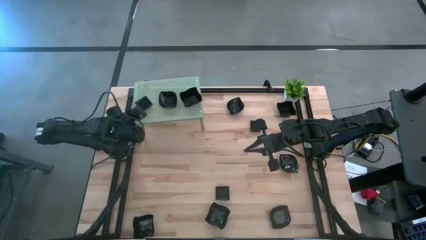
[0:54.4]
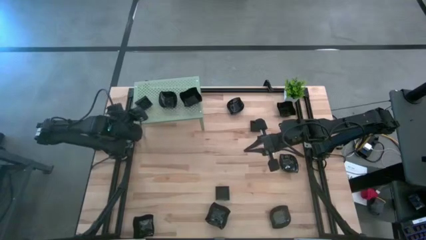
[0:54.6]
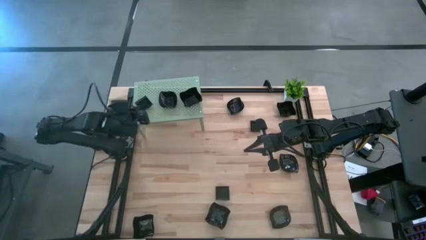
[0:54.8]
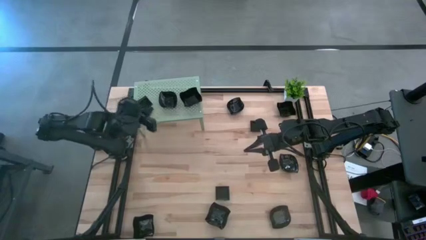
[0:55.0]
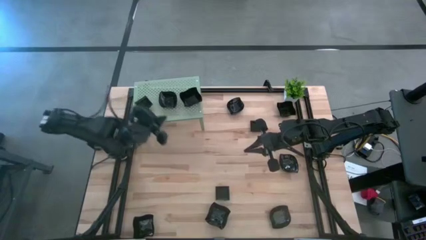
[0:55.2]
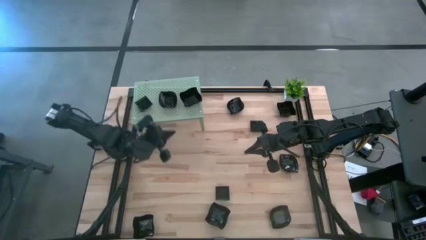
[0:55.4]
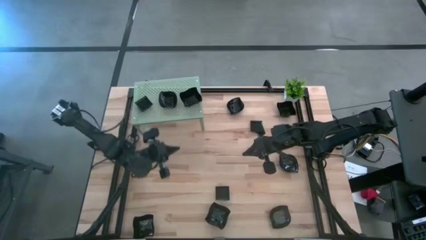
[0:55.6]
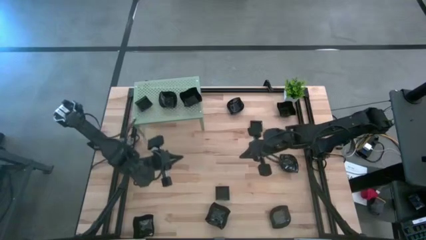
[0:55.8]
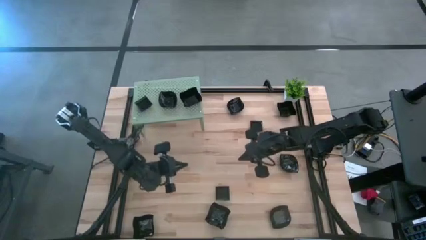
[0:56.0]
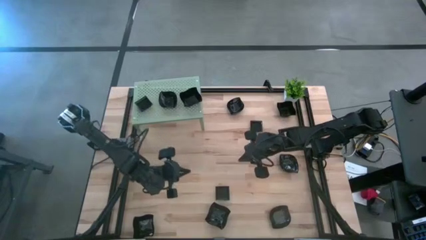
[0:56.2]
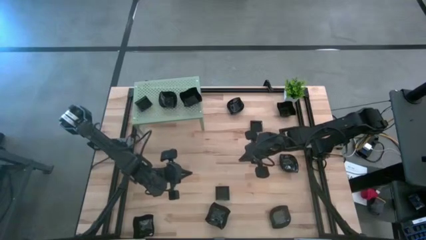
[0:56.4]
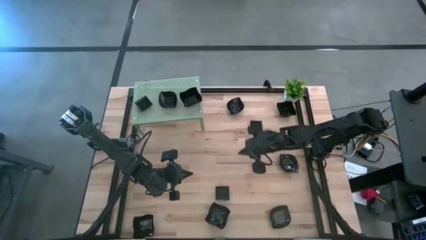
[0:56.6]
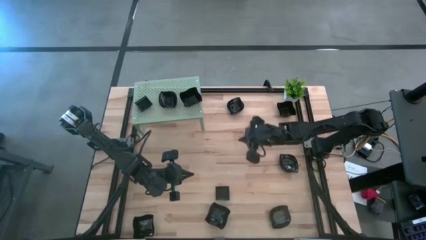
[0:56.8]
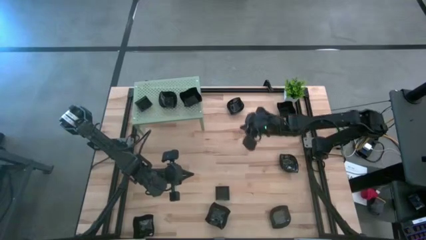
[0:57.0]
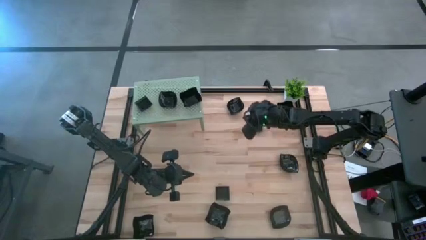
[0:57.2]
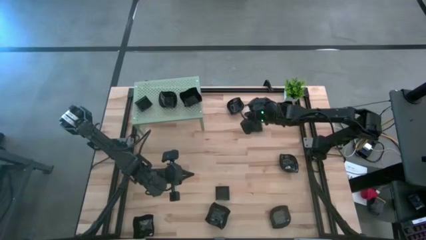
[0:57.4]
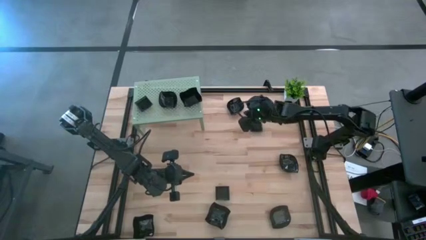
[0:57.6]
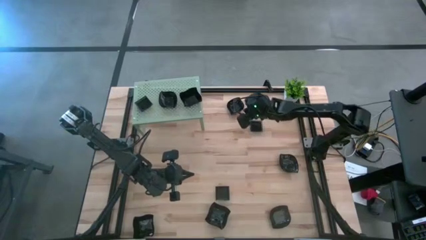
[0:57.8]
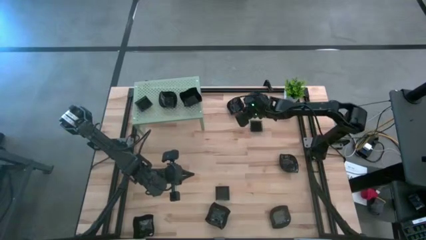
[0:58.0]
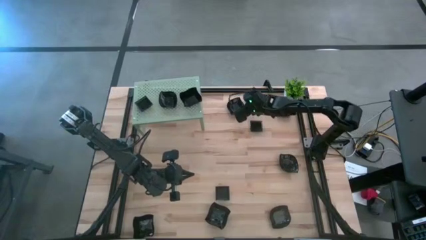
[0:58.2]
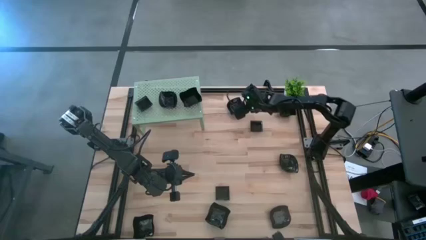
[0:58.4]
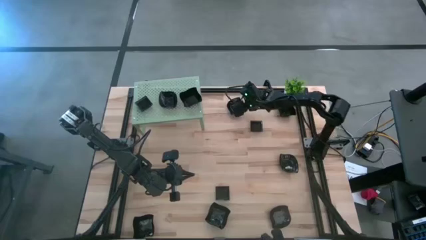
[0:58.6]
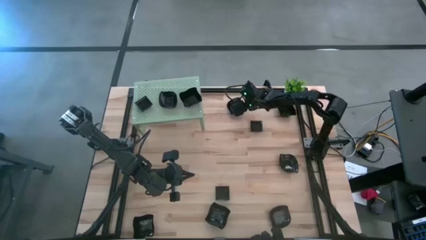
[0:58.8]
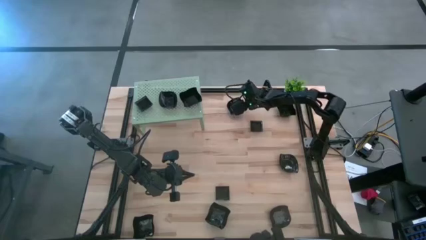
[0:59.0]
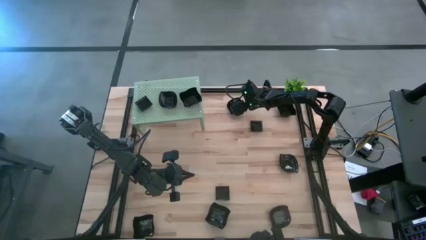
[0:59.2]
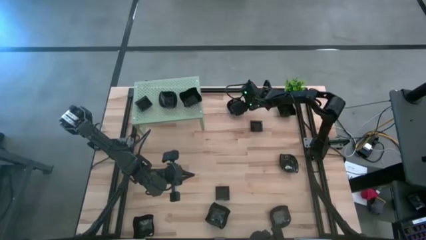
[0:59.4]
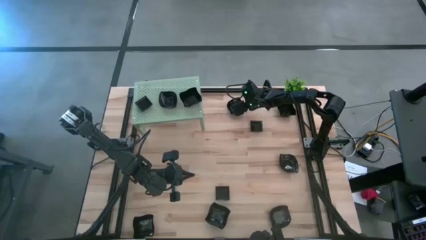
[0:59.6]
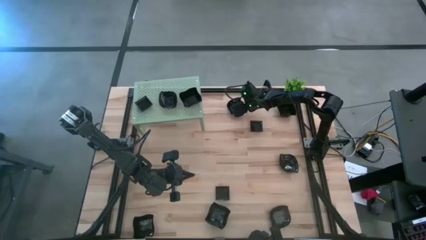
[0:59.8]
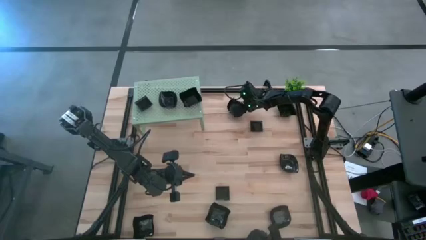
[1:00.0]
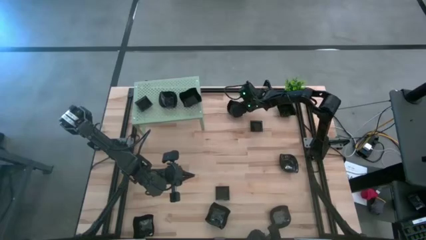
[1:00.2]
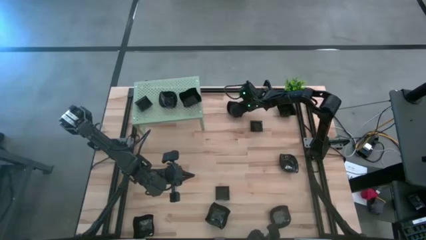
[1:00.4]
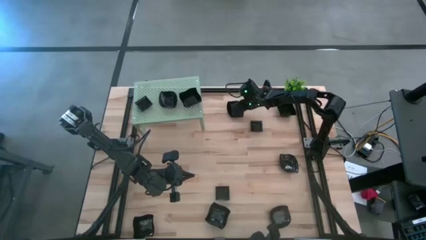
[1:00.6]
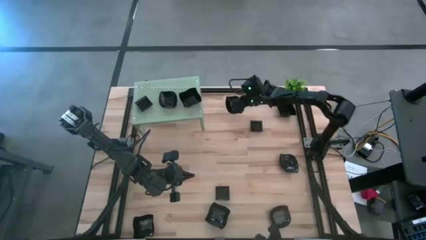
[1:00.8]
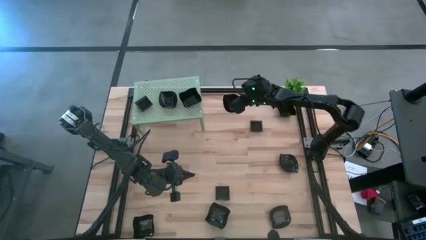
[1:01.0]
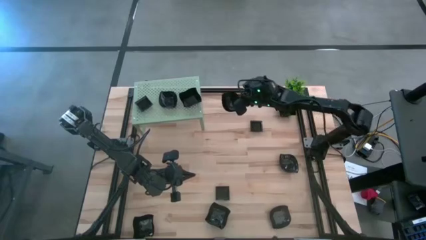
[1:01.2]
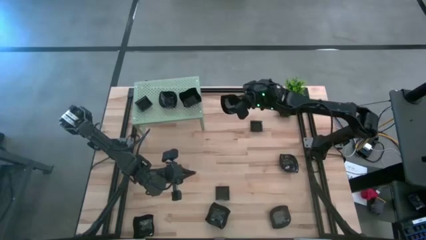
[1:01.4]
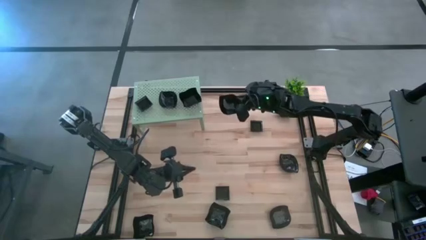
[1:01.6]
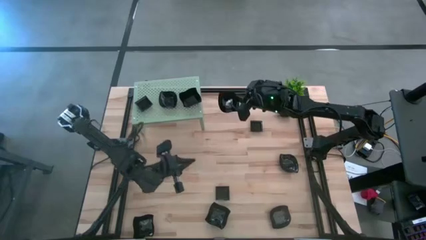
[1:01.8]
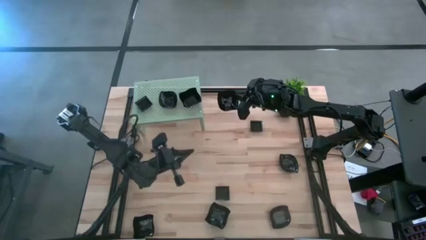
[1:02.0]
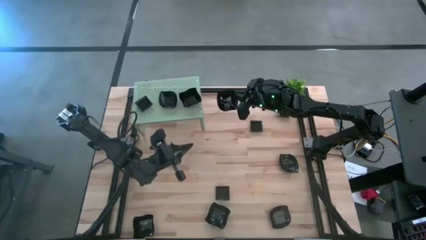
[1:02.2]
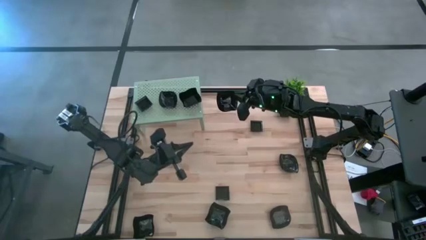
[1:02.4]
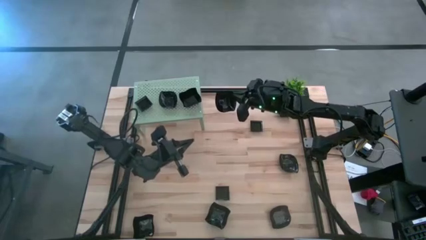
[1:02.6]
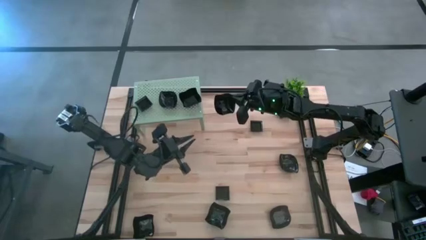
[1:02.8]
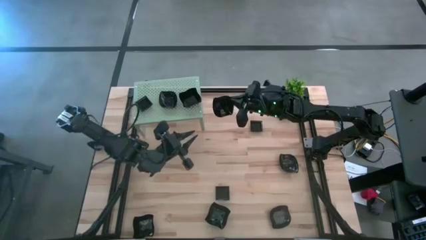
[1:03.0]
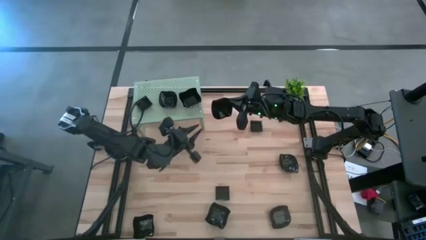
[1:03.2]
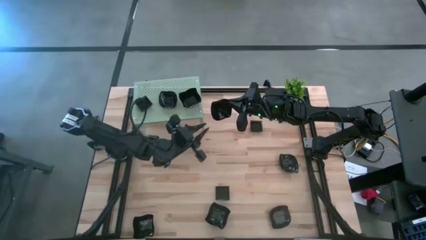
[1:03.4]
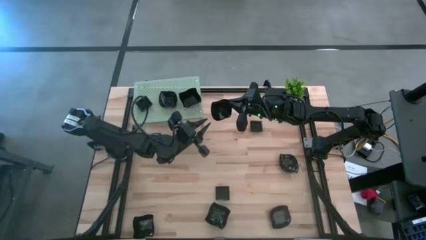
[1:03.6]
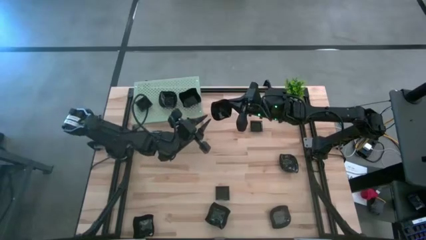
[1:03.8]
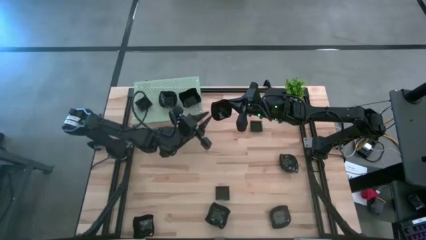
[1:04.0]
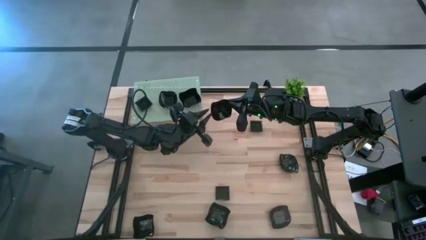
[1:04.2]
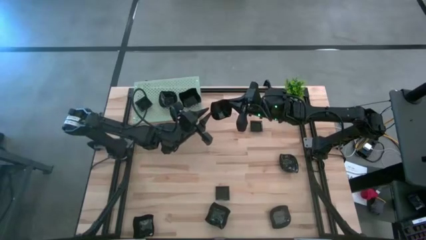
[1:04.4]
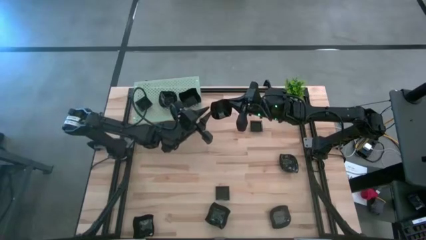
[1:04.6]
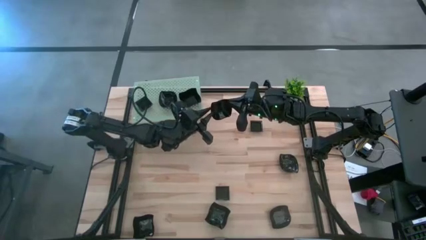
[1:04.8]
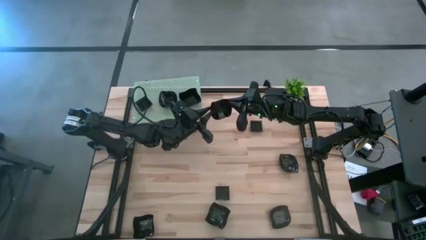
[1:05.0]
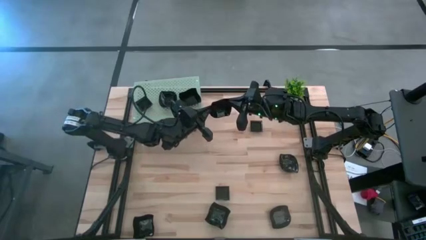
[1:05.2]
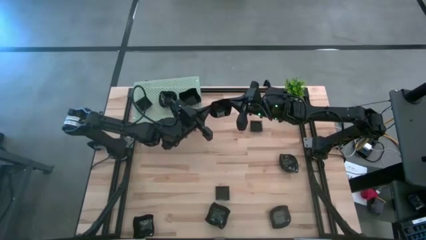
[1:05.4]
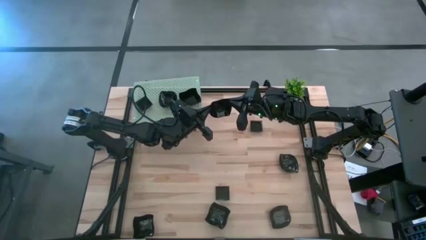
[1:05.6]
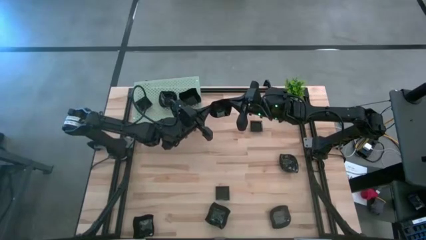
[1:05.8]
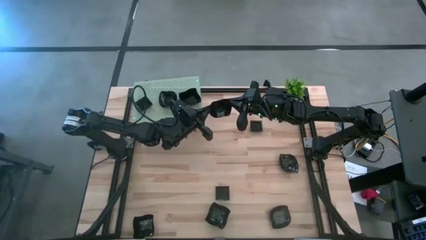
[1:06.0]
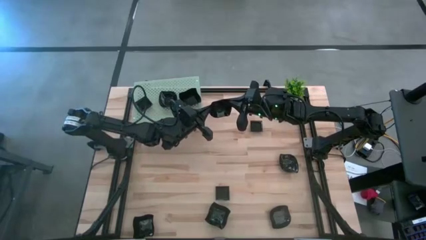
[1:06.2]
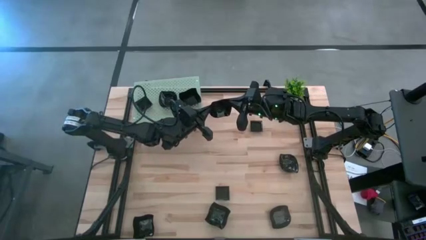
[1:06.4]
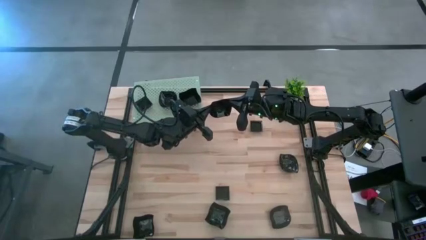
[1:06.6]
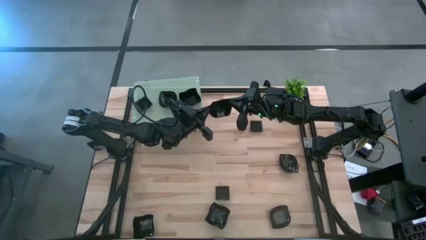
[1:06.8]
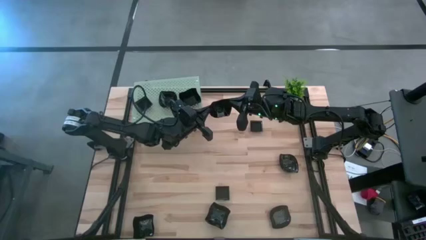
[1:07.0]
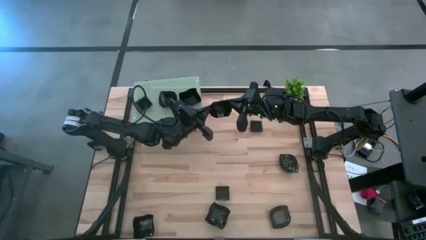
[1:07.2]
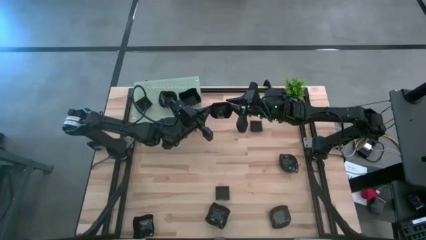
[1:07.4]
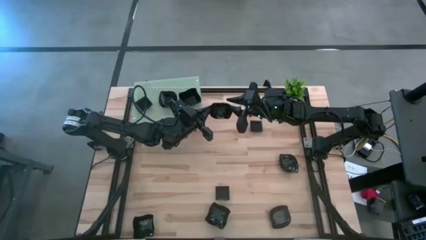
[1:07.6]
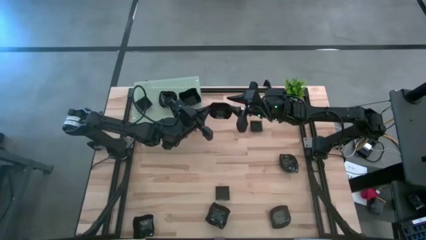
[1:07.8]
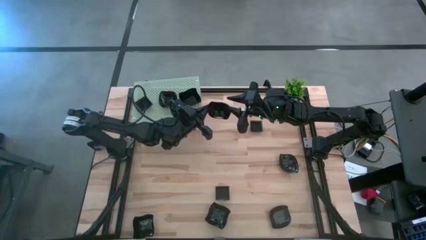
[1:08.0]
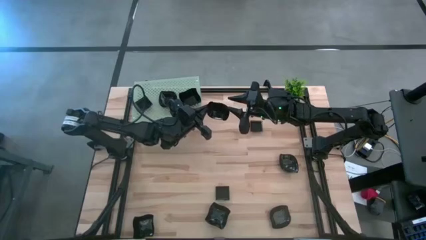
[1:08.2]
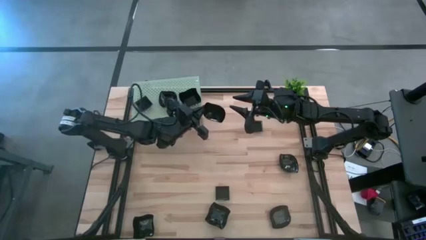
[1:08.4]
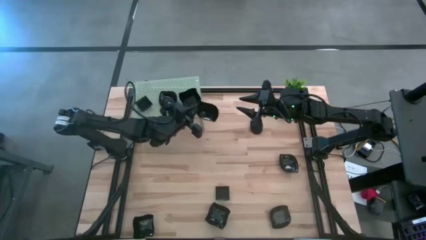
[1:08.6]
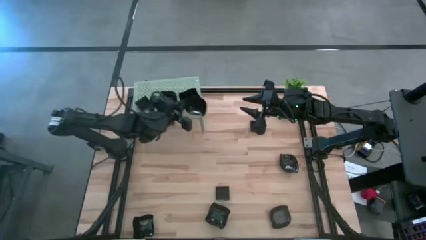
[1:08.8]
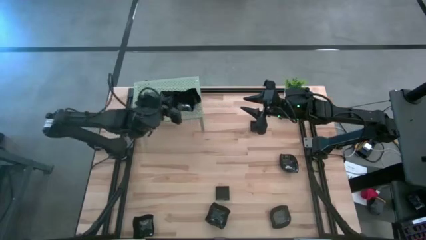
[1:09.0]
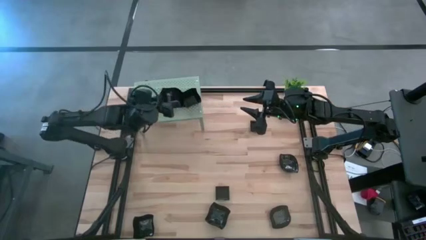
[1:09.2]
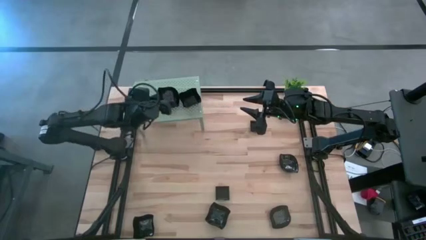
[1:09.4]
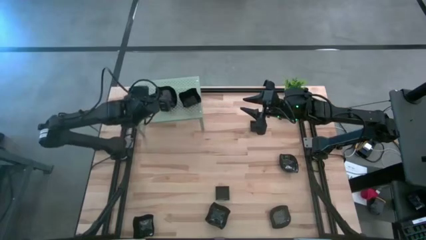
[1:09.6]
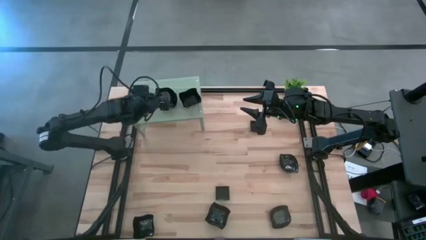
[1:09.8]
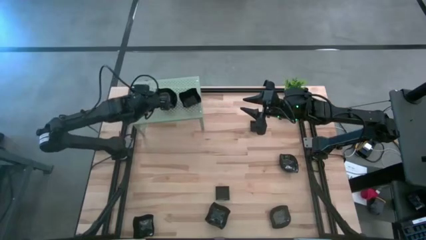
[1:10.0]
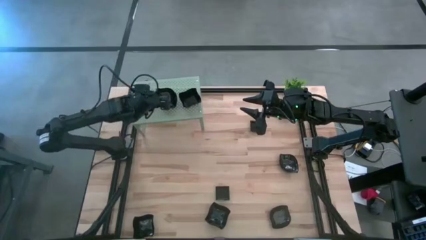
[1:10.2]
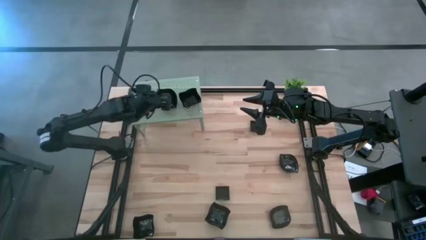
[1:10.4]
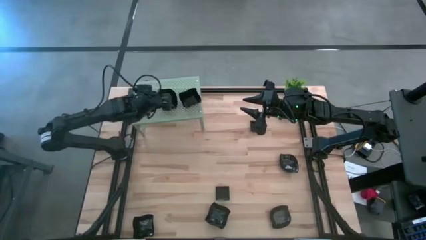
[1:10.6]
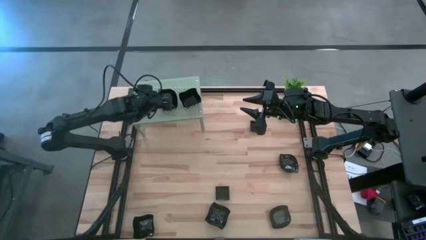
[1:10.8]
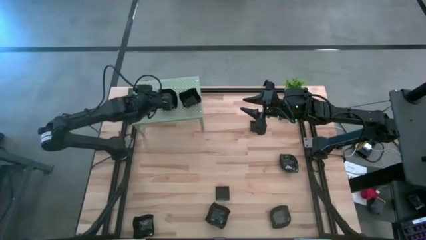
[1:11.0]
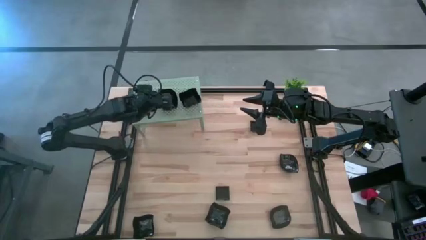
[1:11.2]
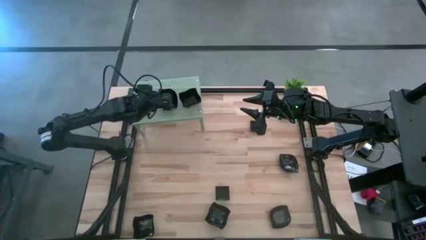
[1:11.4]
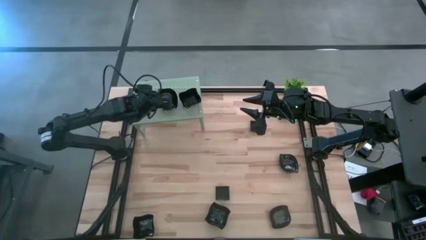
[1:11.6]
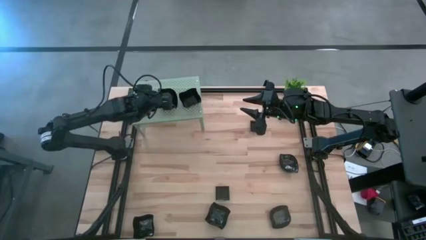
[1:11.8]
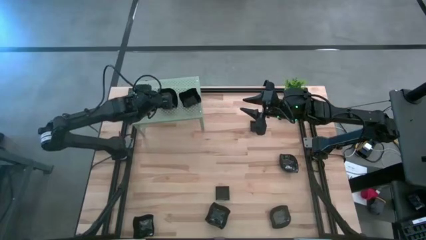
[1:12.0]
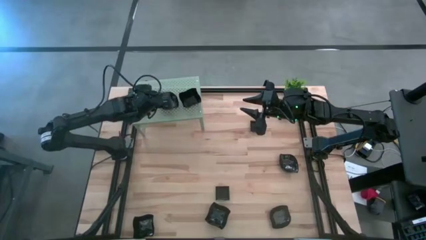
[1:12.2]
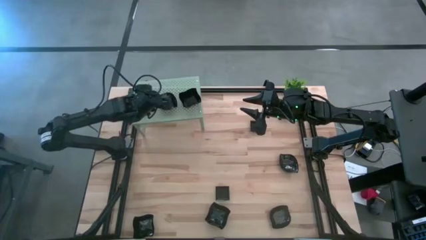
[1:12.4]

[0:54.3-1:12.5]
Task: Pick & Place Mini shaped plates
Stack the black leaf shaped plate on top of the leaf shaped plate on the shelf
